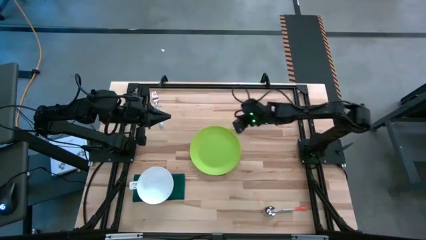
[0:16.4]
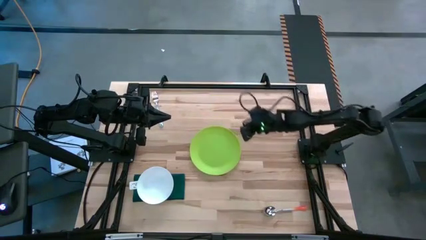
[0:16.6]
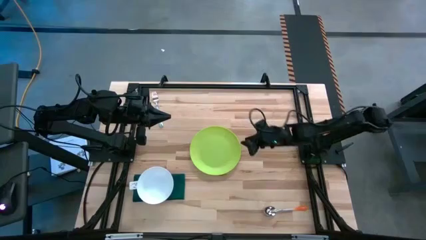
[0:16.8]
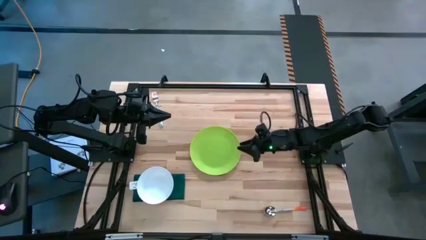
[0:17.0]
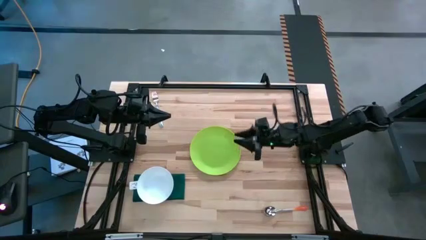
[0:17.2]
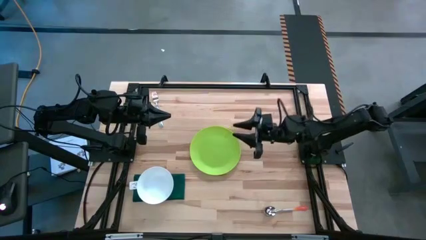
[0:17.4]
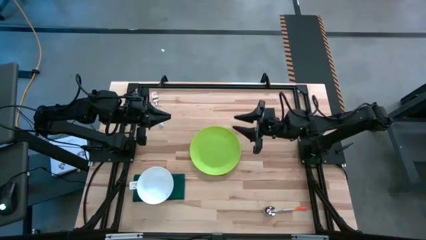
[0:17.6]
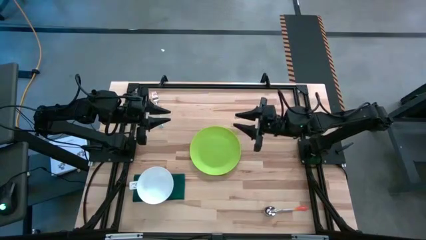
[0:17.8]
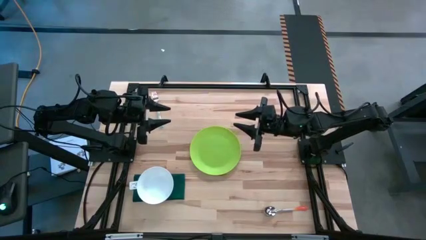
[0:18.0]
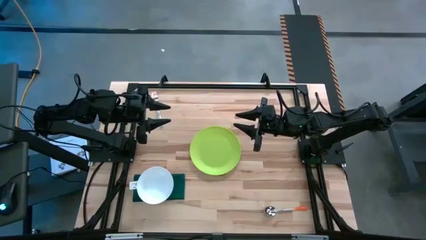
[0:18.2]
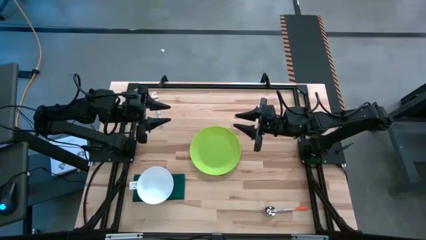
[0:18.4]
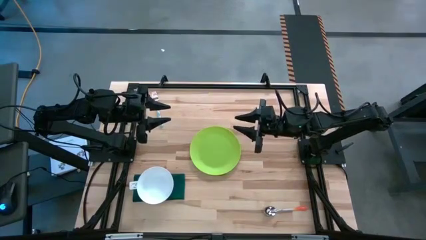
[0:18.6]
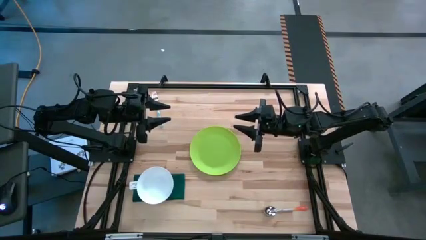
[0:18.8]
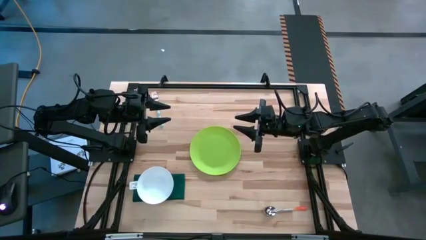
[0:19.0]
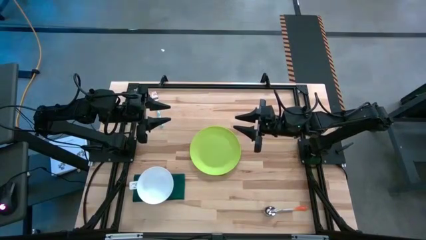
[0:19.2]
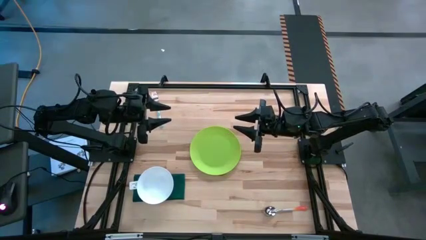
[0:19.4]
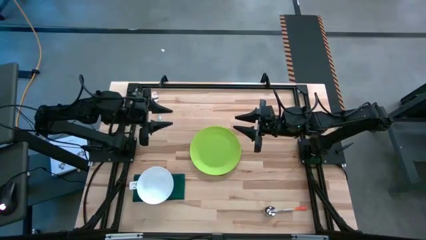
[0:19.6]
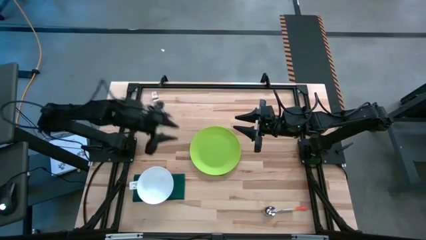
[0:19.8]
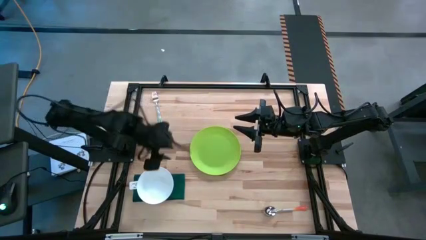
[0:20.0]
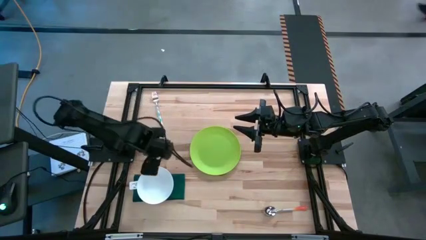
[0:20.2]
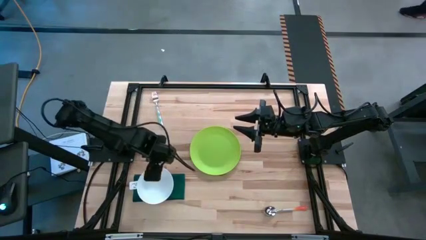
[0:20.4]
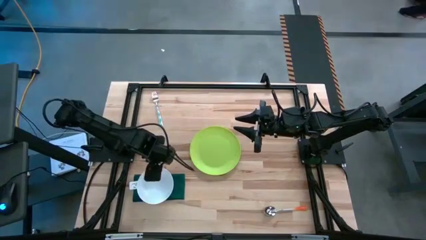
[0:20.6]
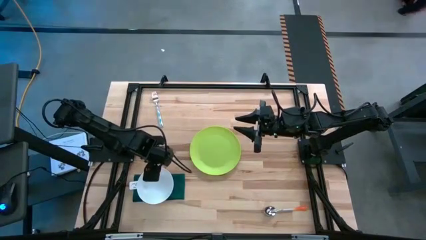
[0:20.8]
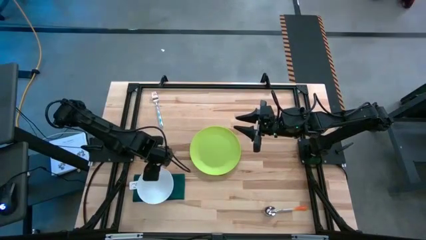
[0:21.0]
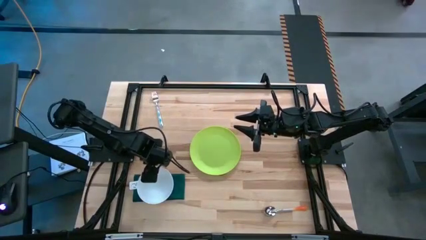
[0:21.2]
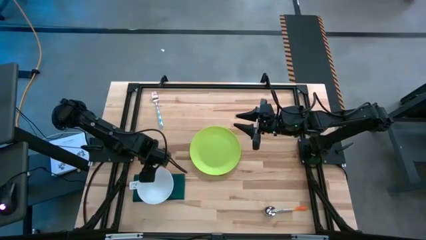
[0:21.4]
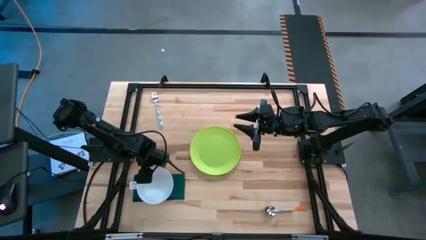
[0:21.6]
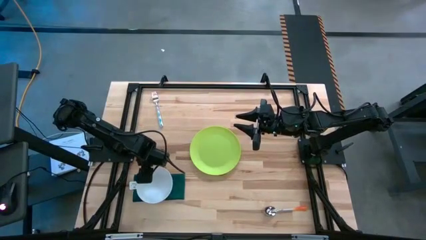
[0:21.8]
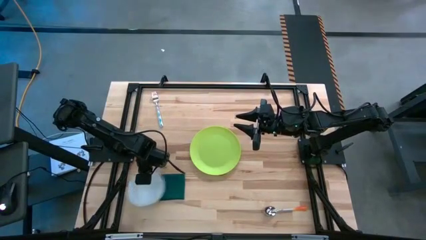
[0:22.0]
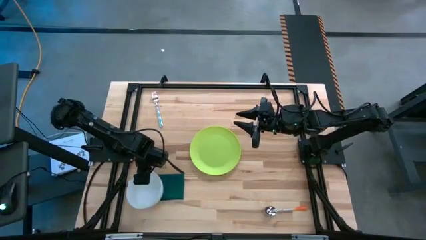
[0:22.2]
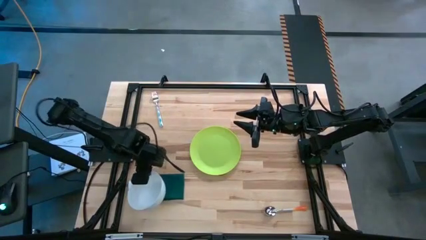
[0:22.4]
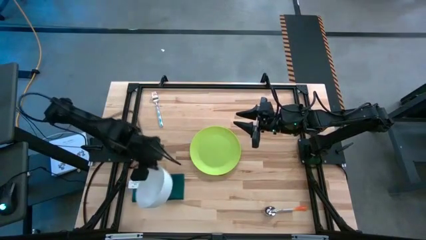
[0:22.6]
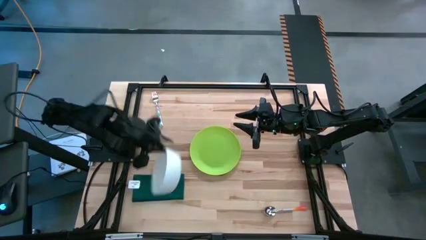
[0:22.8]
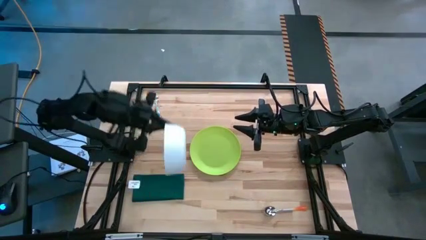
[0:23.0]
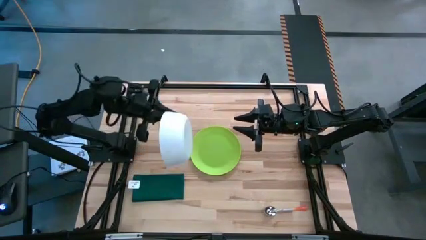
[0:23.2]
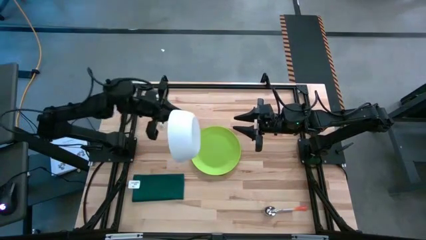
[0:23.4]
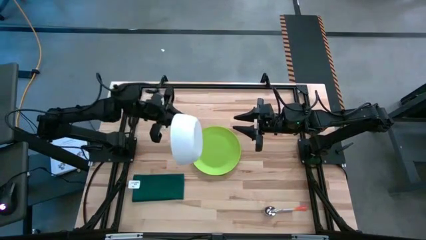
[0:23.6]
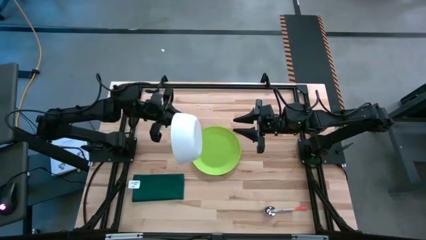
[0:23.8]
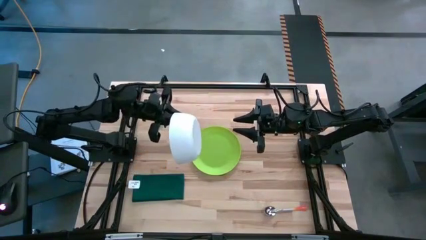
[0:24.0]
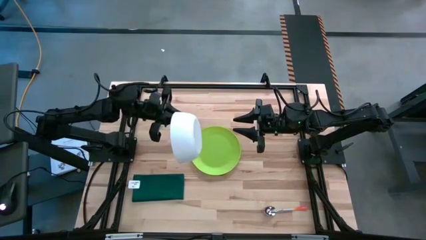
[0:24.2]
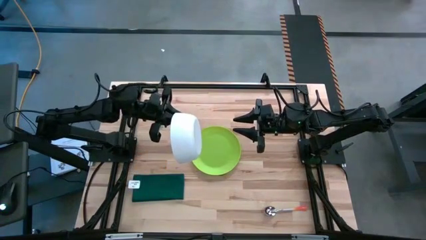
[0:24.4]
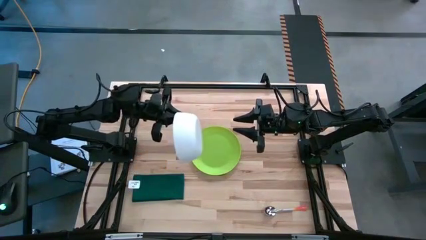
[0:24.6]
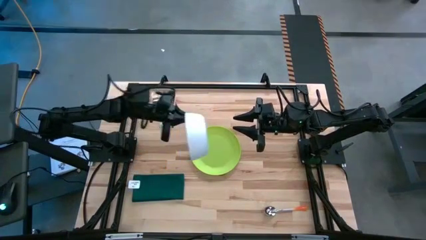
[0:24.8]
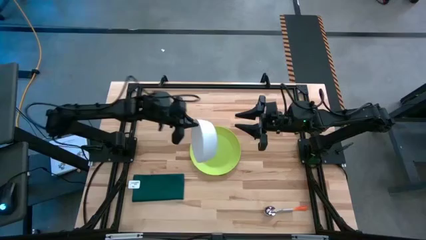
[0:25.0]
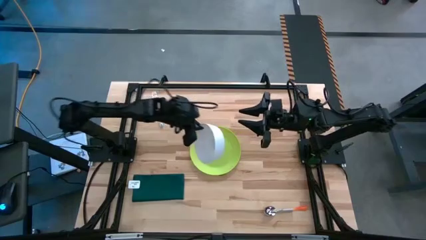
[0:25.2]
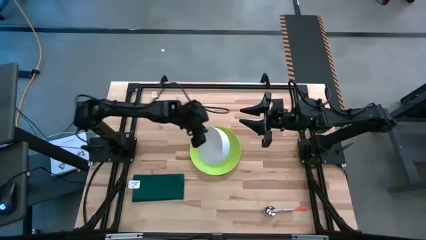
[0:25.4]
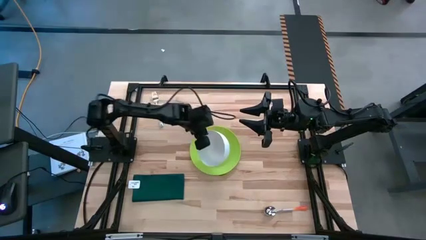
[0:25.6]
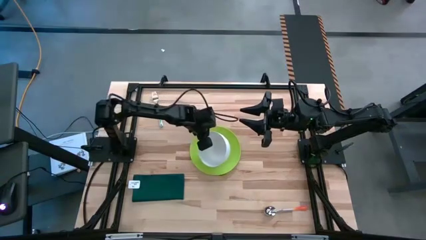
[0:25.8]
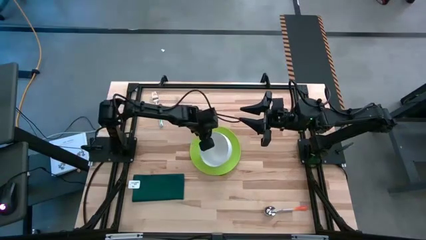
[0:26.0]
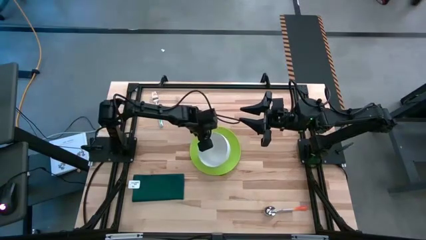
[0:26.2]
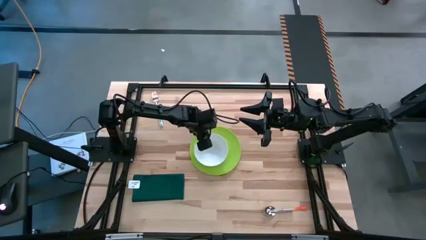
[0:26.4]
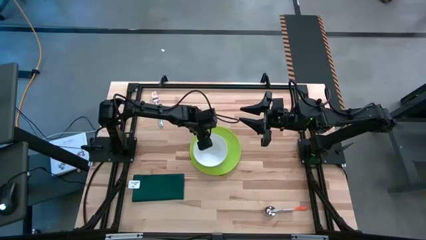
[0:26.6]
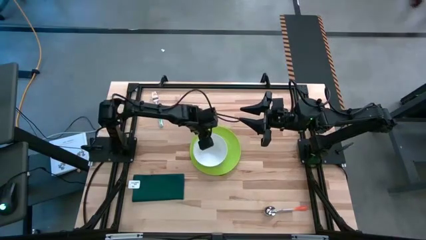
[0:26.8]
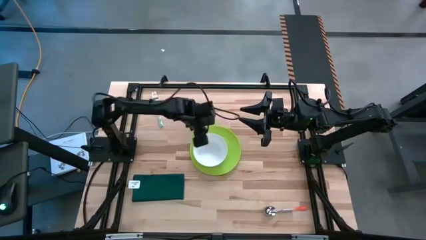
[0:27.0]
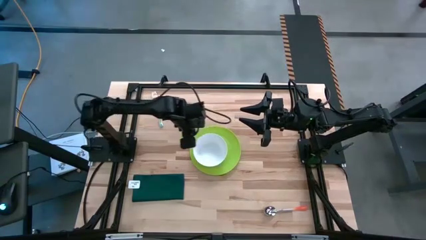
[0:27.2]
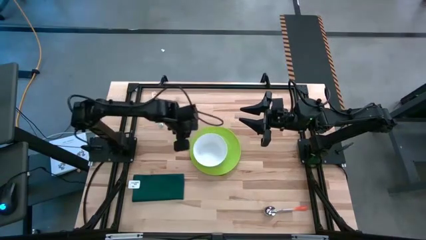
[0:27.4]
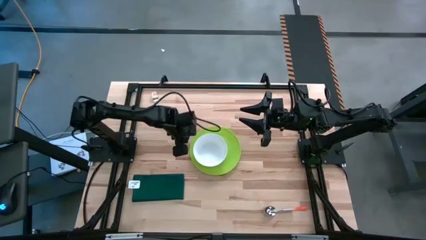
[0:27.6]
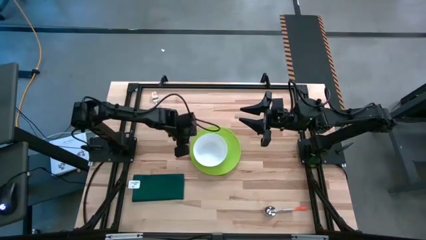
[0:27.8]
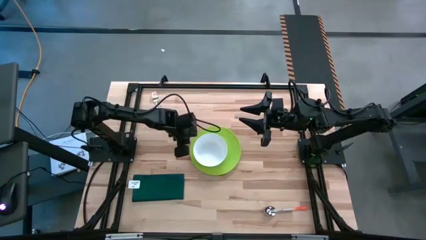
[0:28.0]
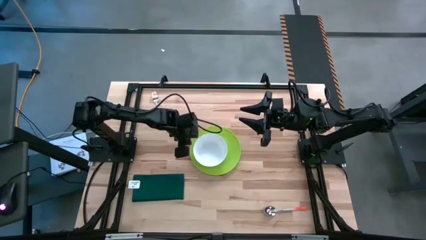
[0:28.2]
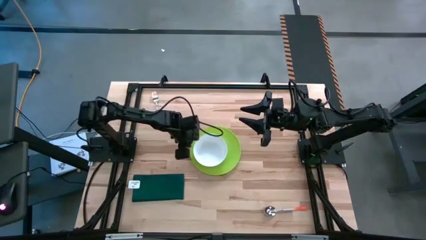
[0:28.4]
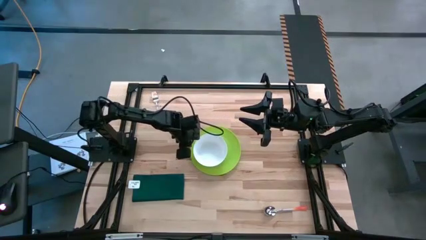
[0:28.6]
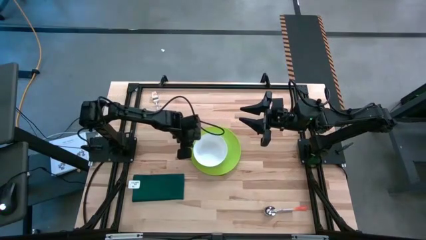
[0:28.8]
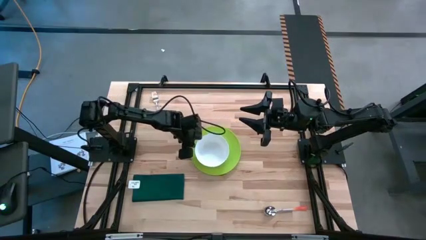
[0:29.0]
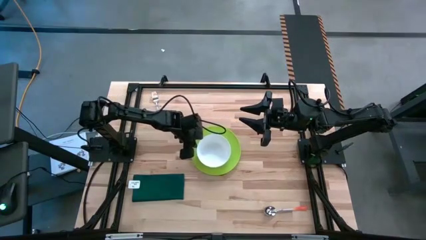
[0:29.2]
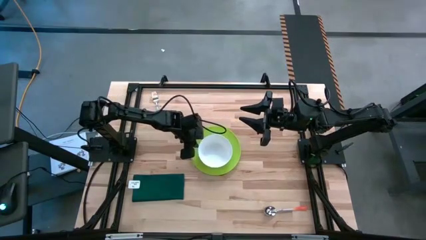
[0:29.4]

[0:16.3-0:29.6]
Task: Set table place
Stack the white bowl on top of the green plate

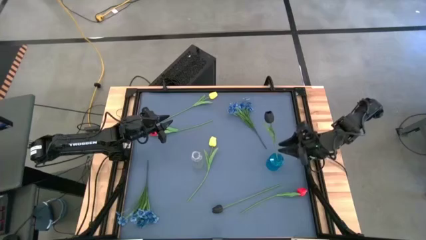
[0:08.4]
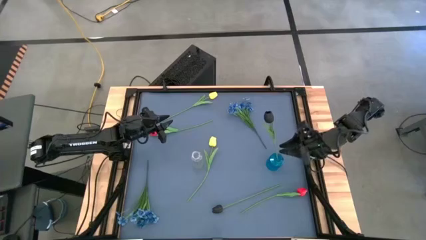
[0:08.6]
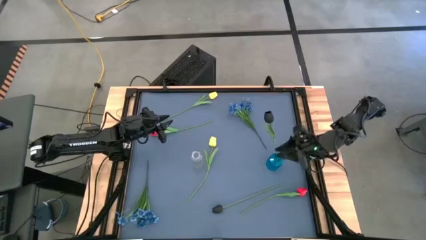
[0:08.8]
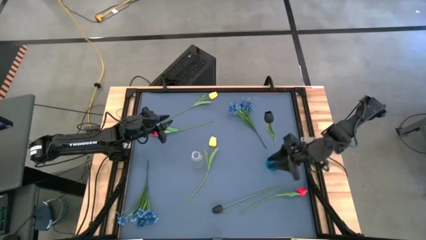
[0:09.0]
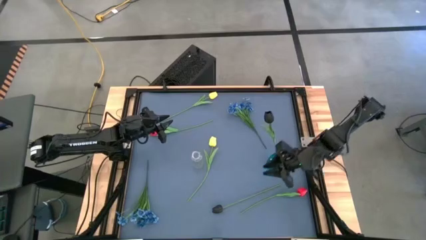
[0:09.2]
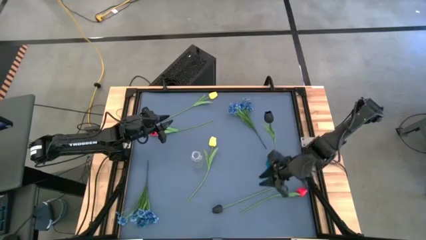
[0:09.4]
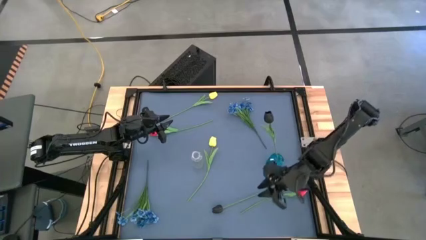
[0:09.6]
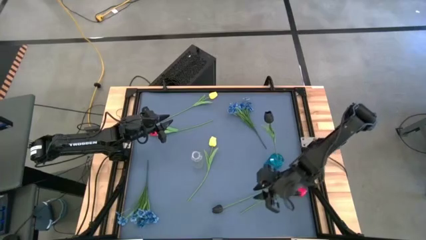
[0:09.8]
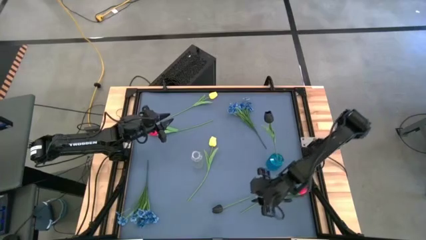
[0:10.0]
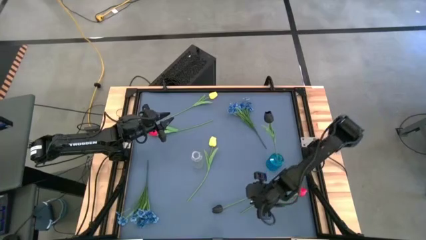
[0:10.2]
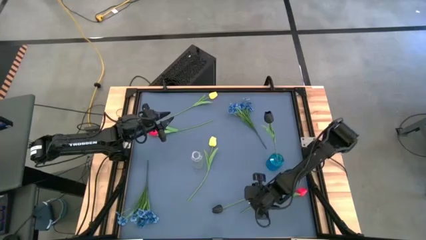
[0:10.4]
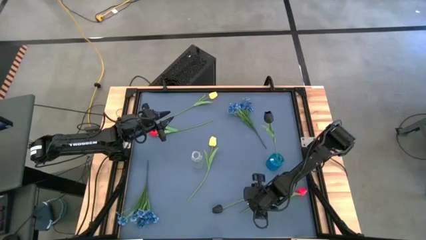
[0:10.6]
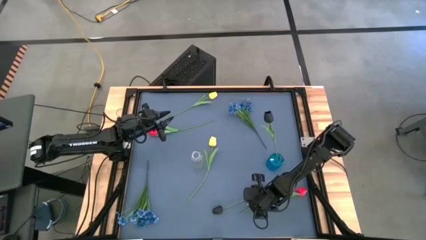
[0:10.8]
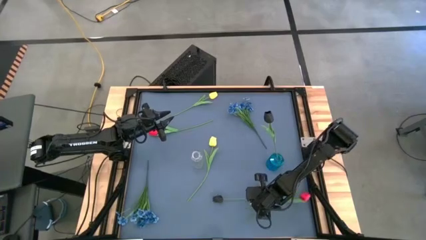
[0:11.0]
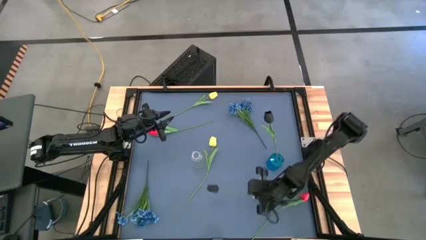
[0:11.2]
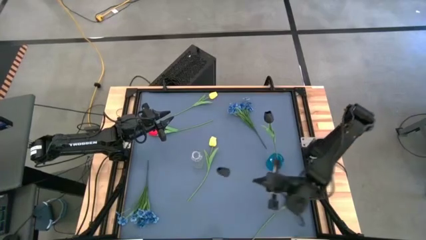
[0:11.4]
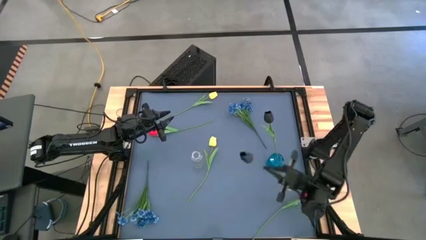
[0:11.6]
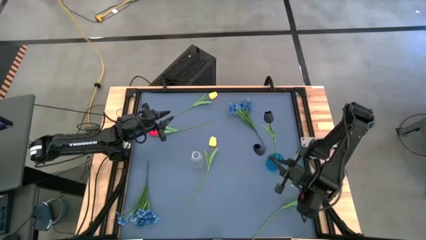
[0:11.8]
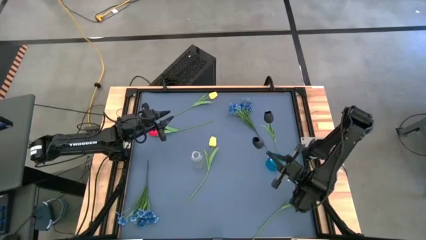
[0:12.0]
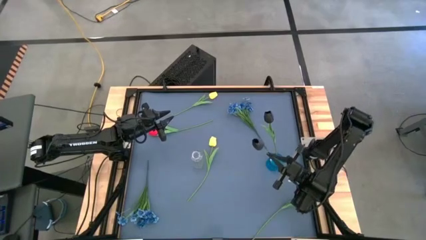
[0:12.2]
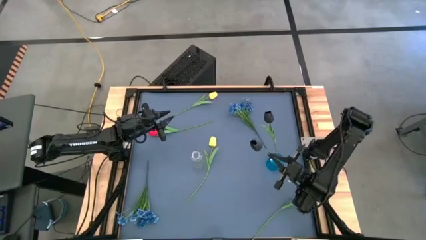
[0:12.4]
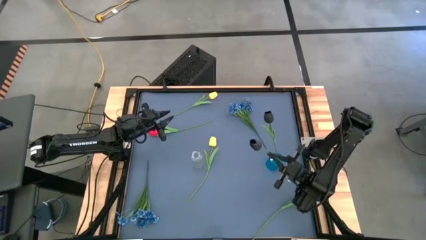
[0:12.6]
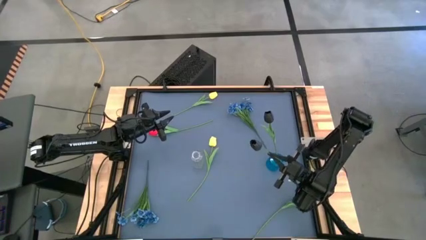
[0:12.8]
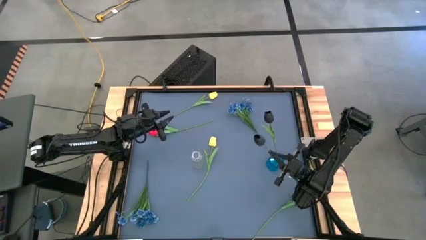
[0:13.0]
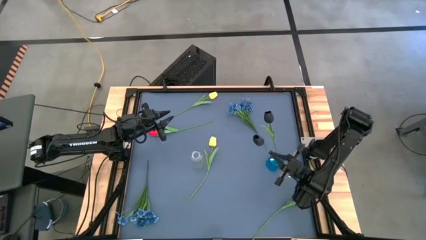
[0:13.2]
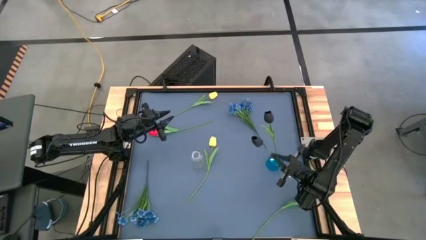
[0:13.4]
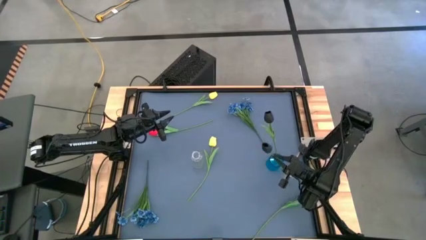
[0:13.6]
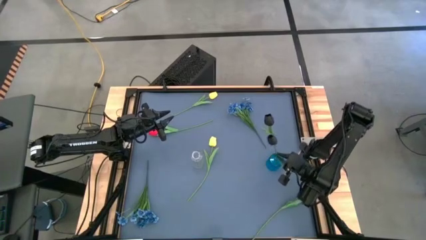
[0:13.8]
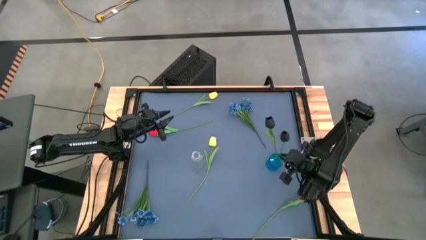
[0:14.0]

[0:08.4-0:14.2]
Task: Sort flowers into vase by color
Put the black flower into the blue vase
